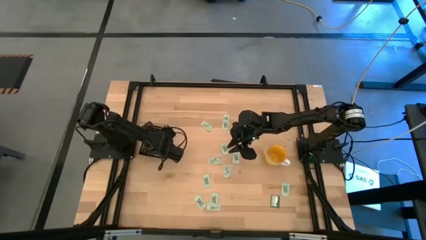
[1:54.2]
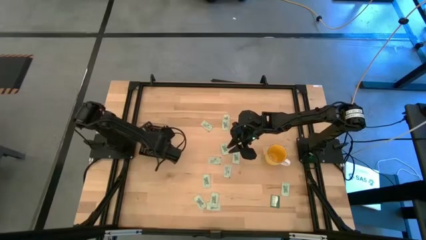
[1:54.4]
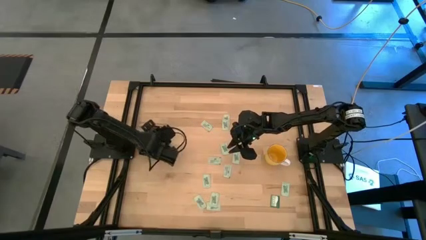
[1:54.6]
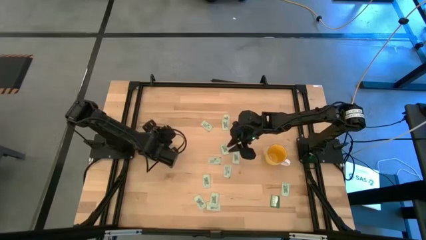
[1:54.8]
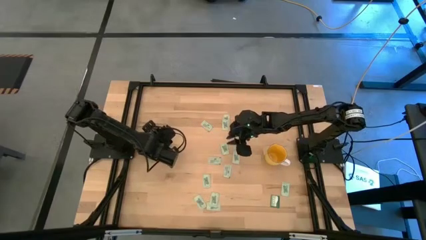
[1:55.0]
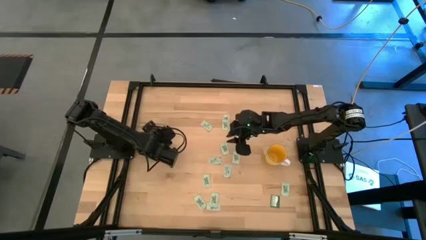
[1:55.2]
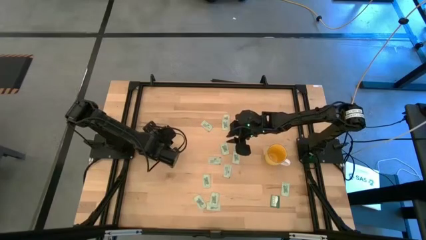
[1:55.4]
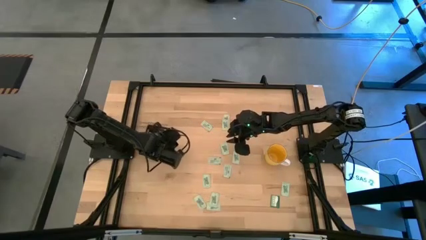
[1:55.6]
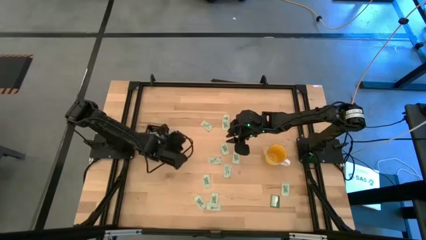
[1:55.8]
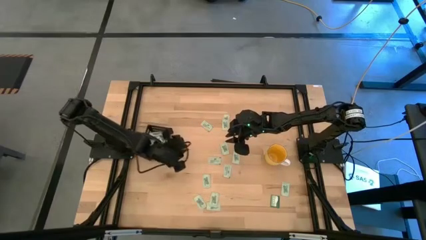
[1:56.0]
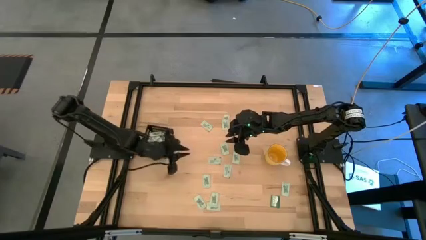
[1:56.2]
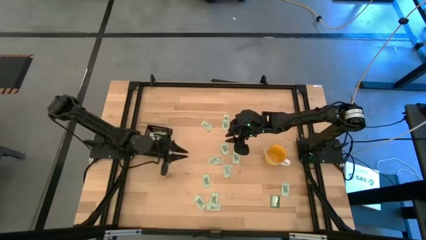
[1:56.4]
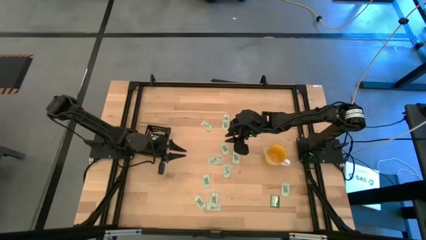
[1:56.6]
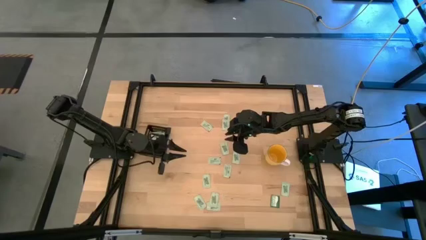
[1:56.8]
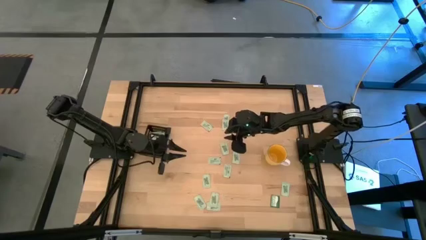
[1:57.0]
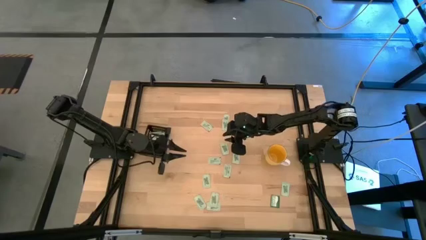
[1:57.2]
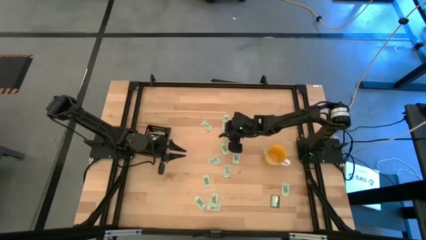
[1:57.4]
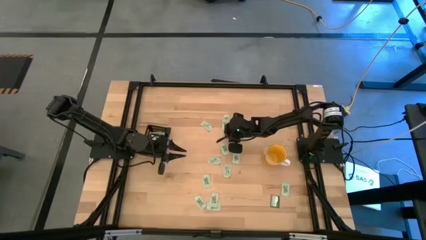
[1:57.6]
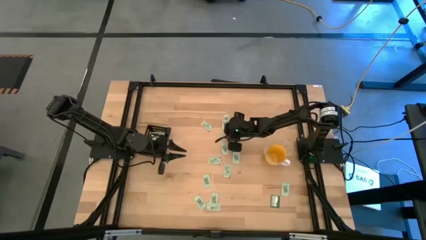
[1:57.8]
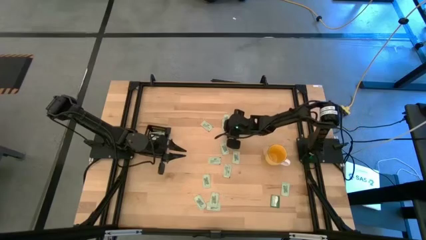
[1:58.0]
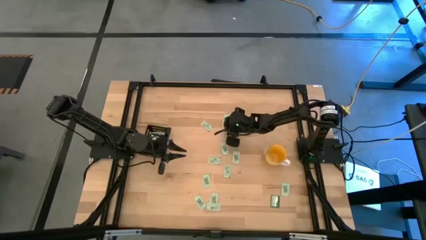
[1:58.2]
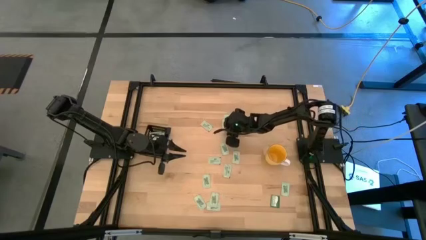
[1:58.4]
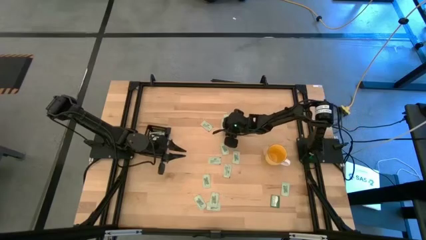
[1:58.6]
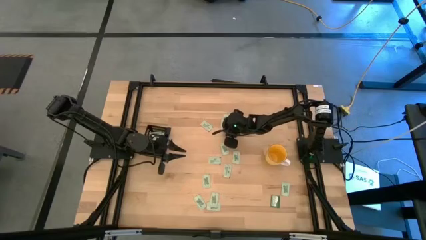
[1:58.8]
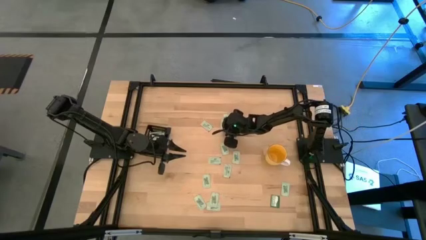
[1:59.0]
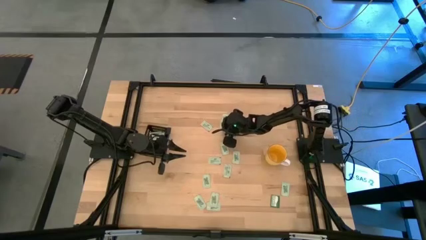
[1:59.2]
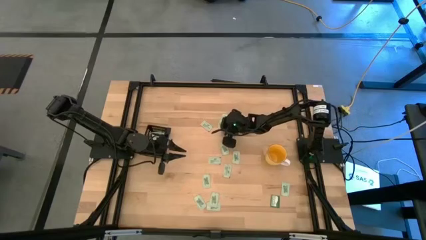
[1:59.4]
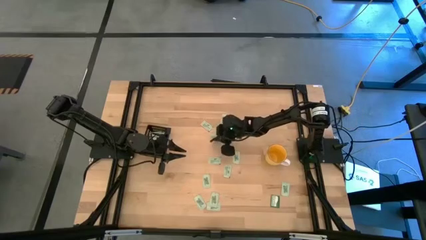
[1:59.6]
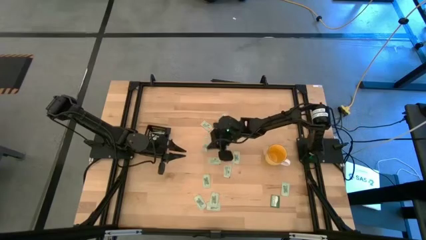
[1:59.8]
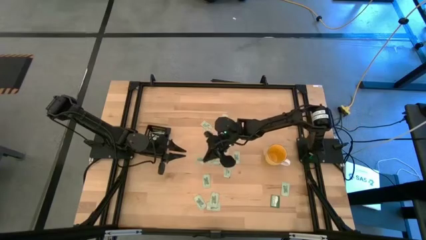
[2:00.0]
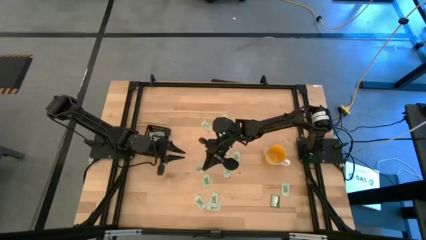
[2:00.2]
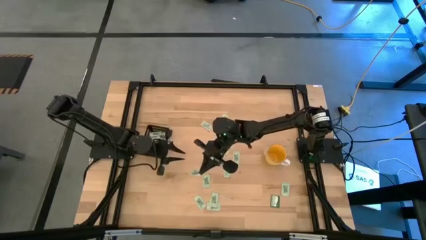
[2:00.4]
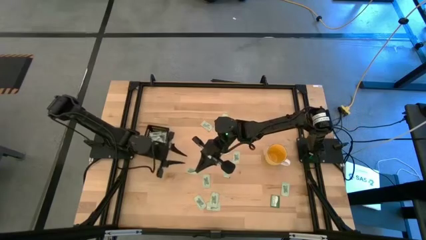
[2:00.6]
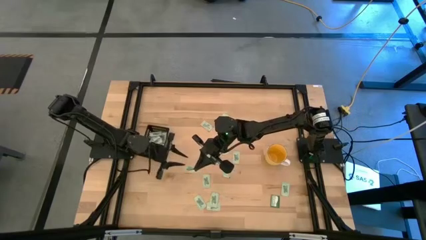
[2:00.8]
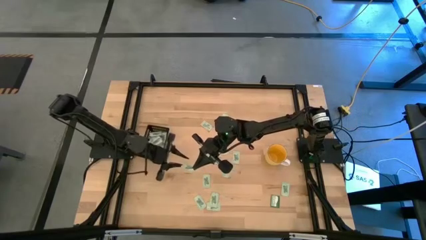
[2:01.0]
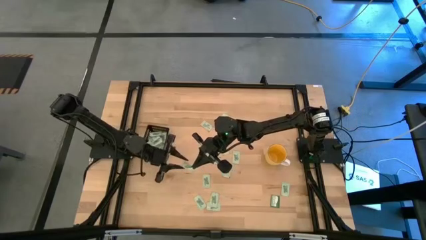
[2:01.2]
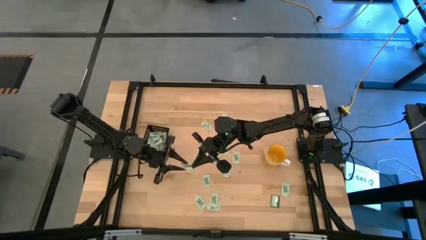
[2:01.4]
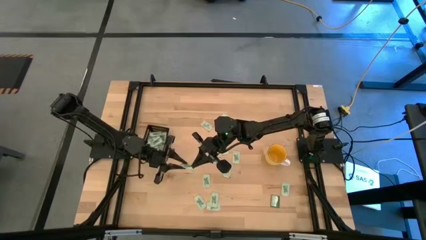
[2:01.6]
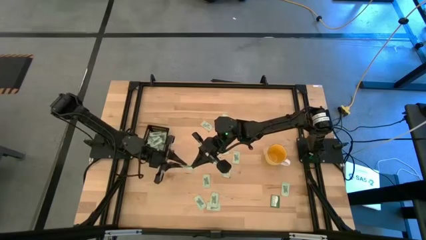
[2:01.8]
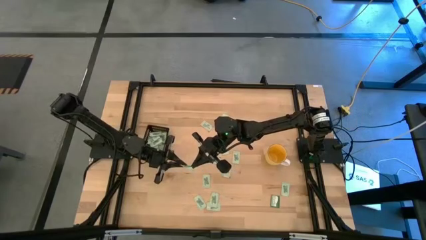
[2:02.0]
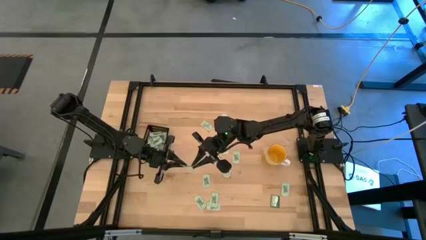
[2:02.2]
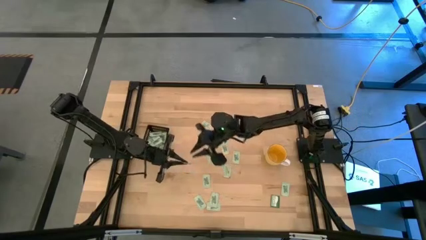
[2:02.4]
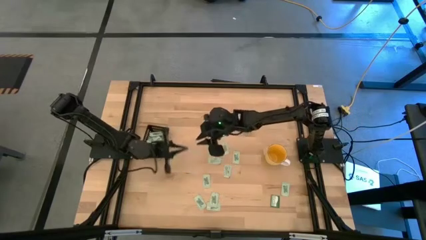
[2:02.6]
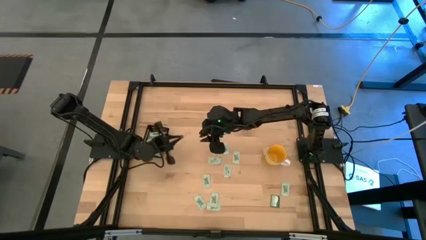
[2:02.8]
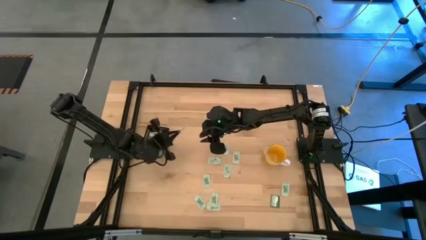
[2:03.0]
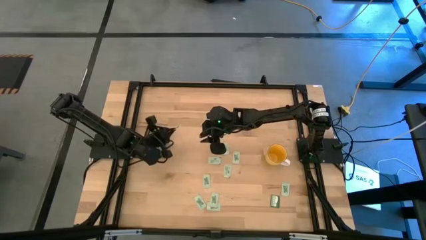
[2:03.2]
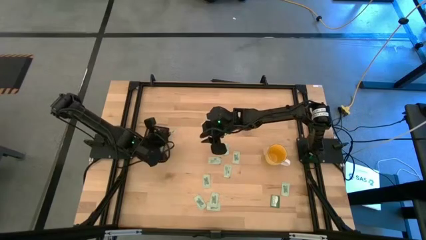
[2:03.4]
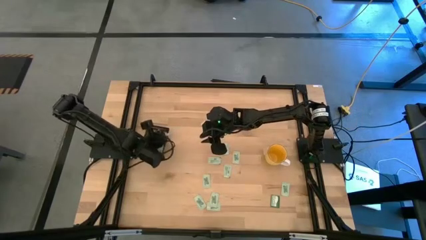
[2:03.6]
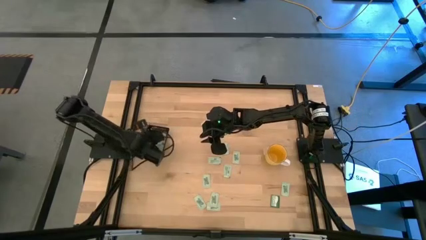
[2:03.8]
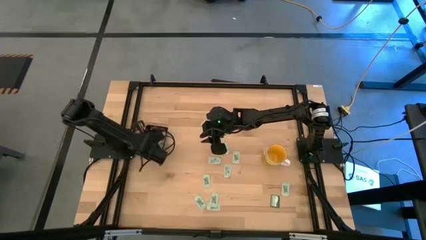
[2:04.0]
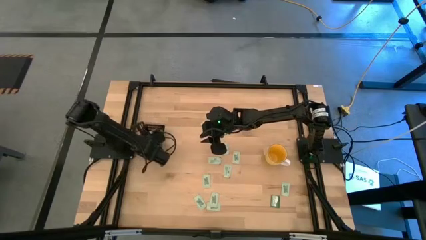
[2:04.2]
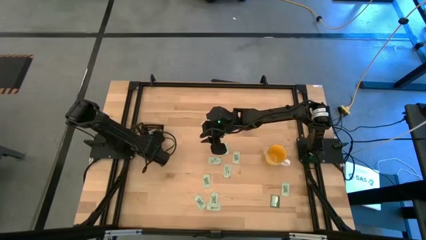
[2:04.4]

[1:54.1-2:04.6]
Task: Pick and place Stevia / Truvia into bins
Put the stevia packet into the black bin

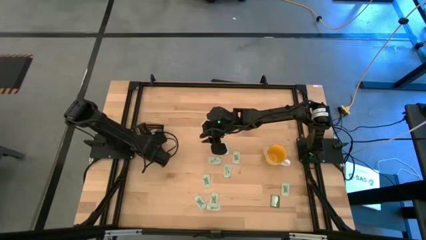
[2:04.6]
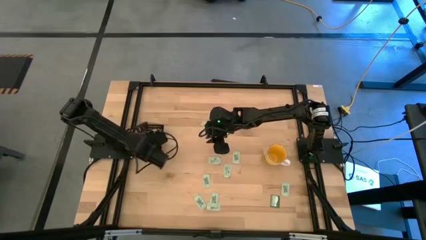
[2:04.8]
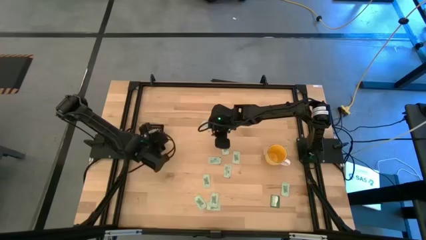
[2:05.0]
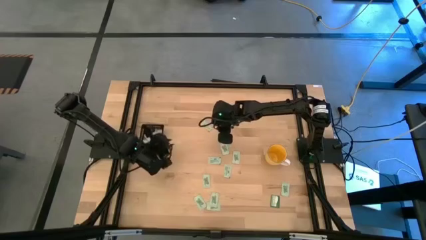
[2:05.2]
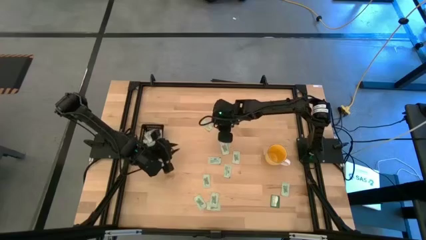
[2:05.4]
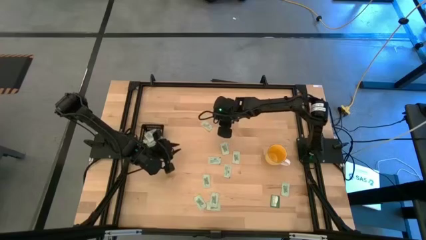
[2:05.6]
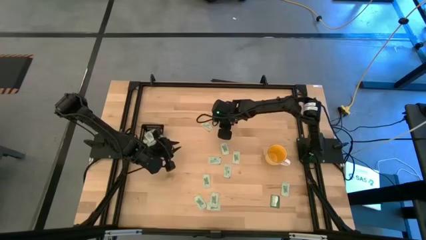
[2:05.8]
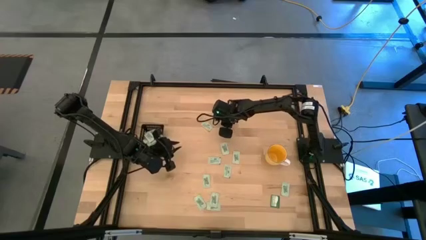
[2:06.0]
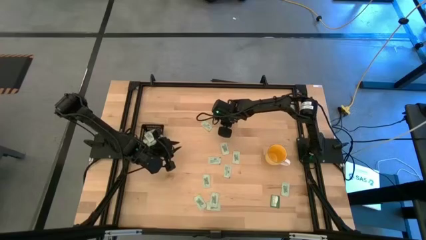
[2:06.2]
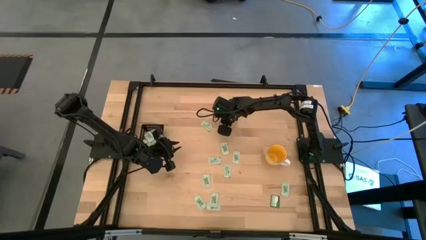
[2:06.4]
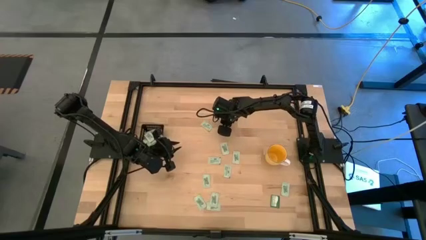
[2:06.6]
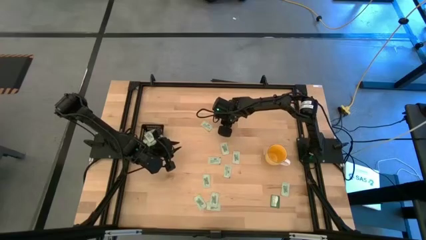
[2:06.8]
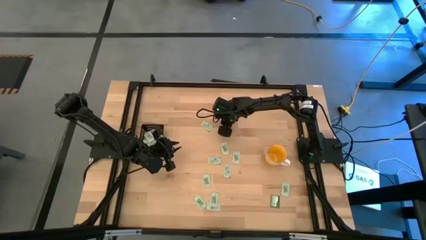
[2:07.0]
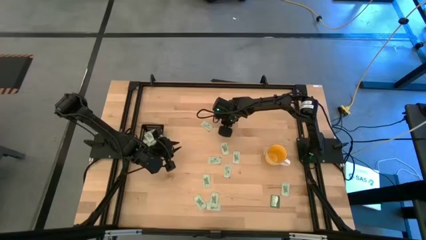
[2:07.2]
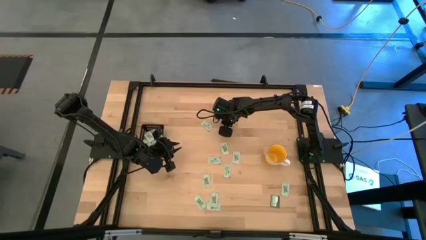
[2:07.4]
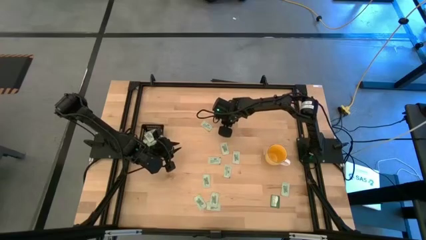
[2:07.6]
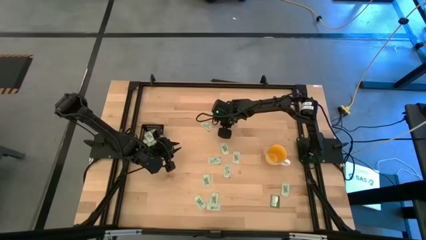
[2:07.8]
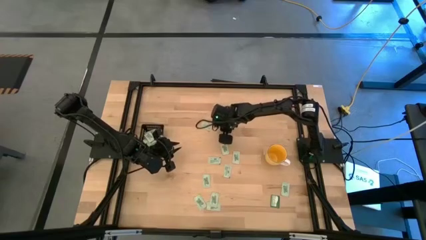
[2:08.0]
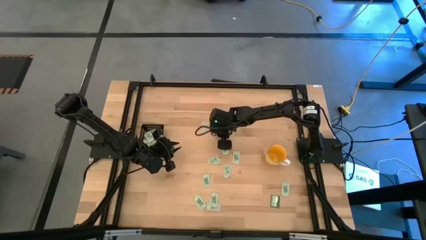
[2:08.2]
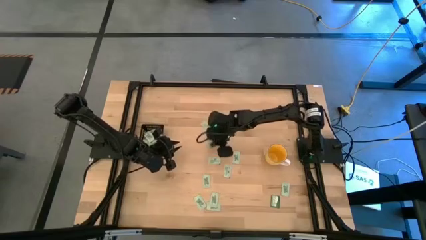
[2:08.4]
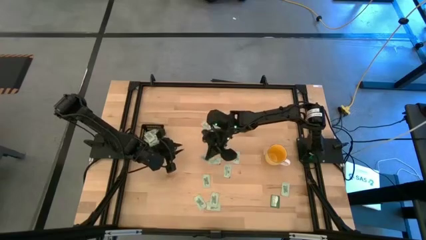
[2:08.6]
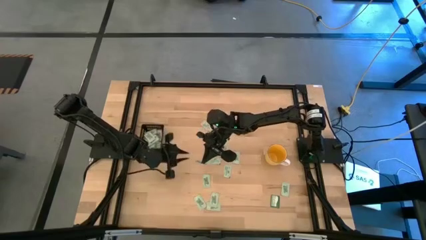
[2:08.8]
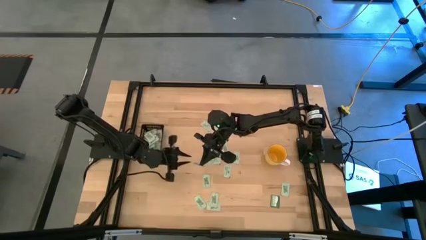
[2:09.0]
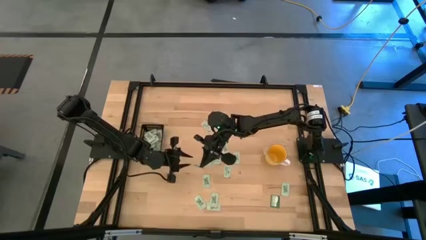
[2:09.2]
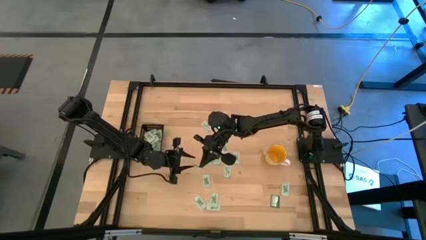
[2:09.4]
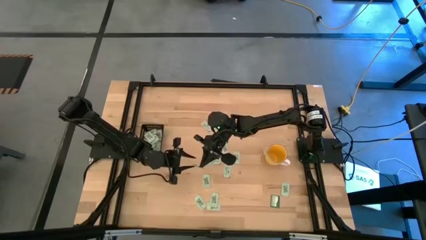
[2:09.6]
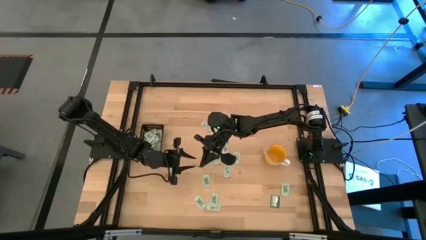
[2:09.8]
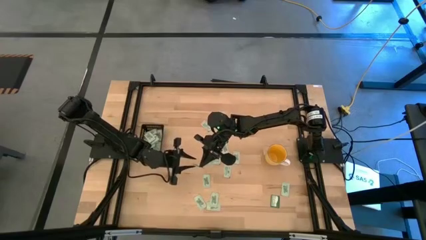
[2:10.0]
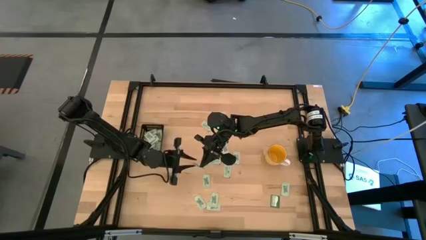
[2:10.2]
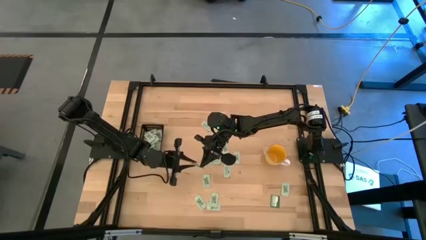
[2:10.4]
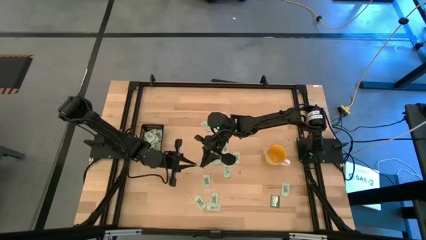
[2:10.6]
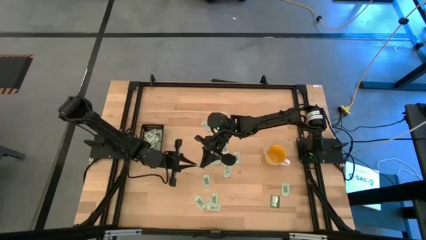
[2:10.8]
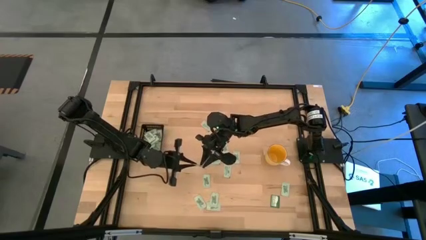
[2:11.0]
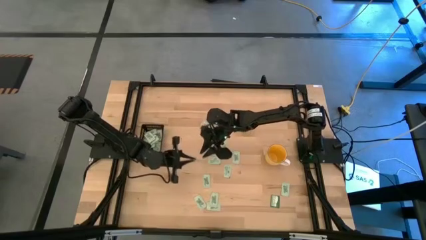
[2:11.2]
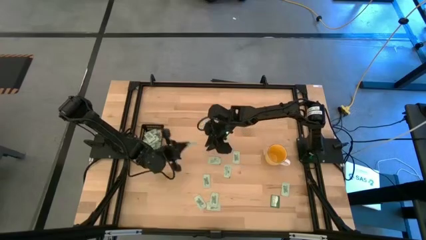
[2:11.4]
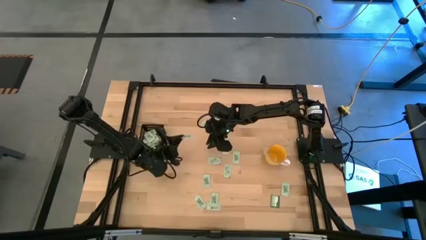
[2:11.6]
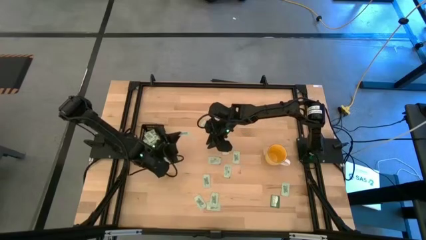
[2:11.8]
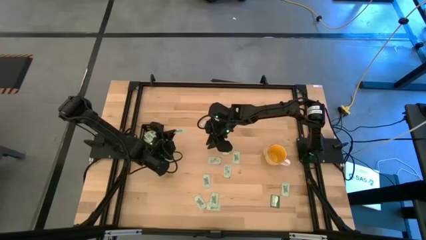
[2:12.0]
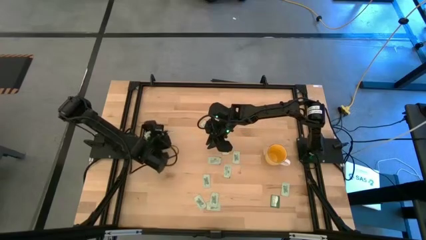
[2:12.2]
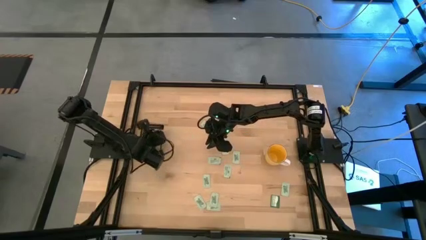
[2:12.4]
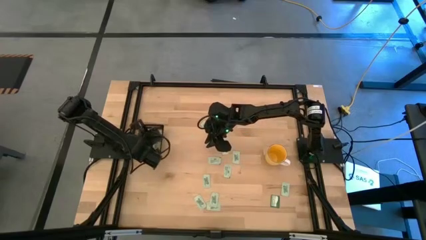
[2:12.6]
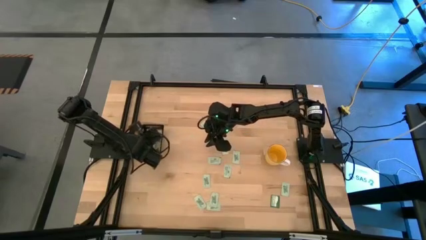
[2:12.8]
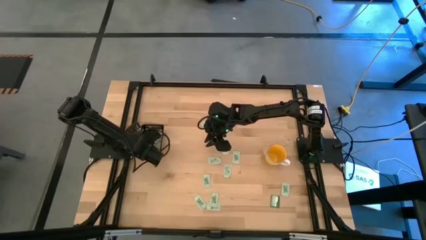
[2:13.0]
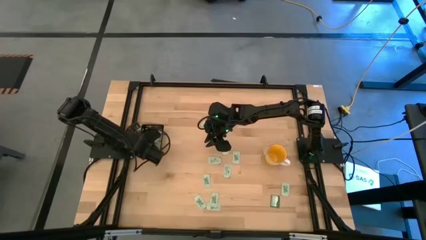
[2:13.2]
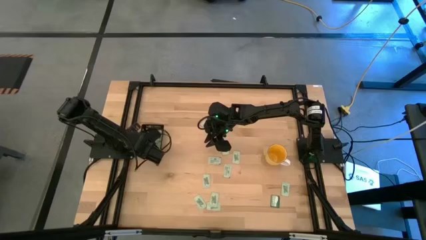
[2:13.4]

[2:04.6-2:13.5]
Put the stevia packet into the black bin
